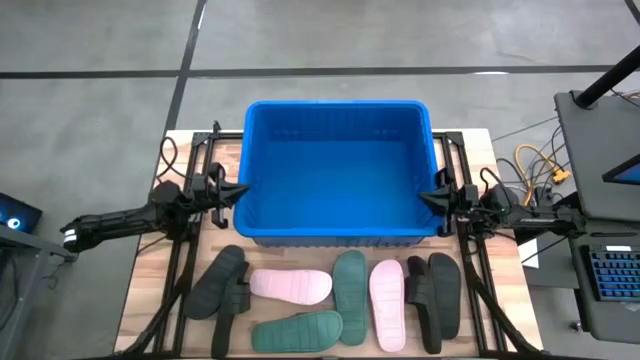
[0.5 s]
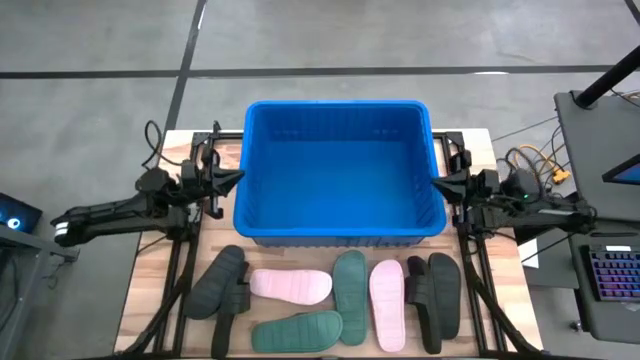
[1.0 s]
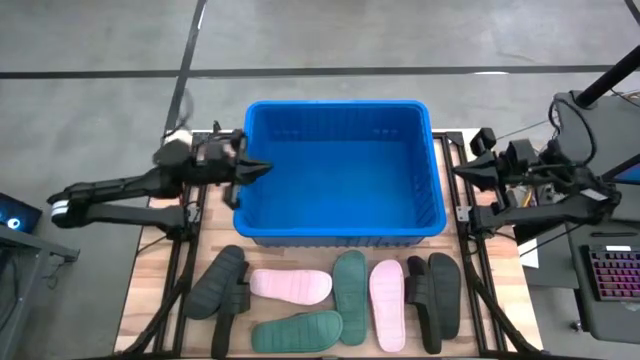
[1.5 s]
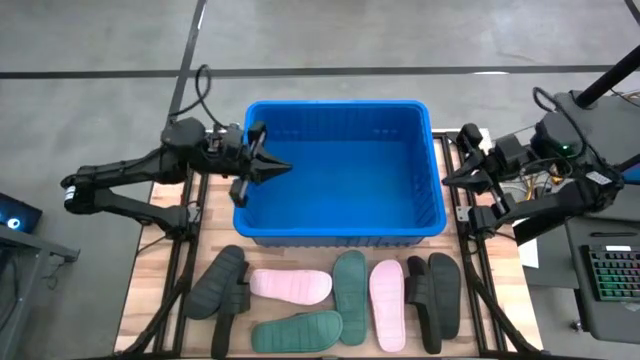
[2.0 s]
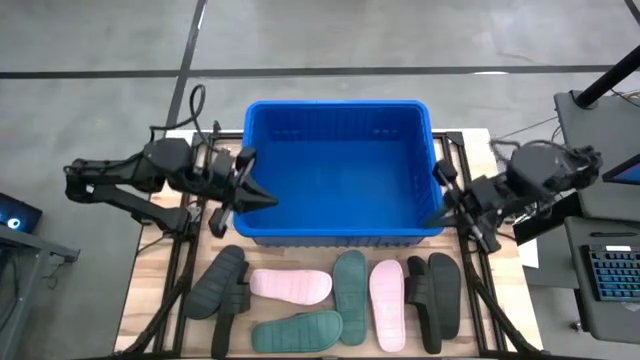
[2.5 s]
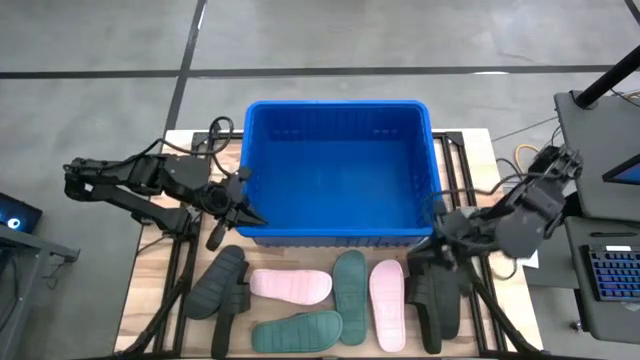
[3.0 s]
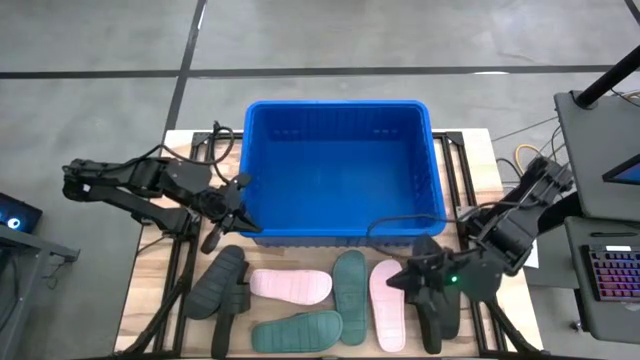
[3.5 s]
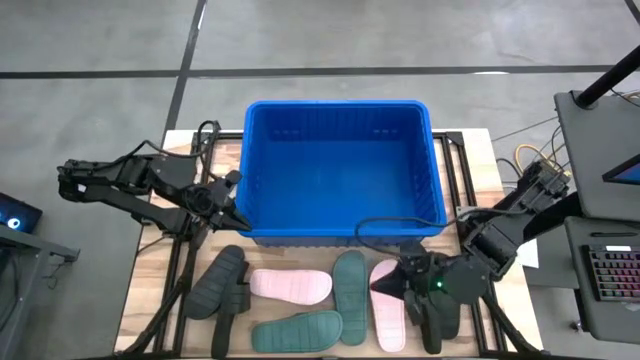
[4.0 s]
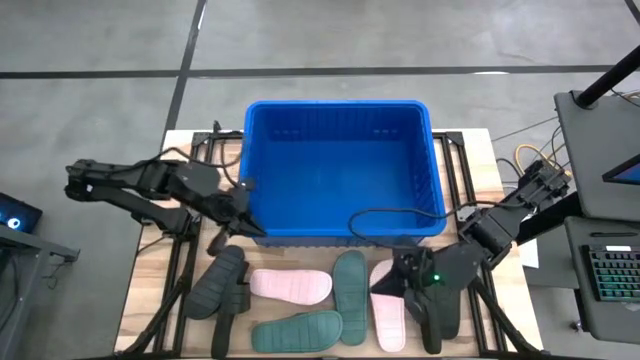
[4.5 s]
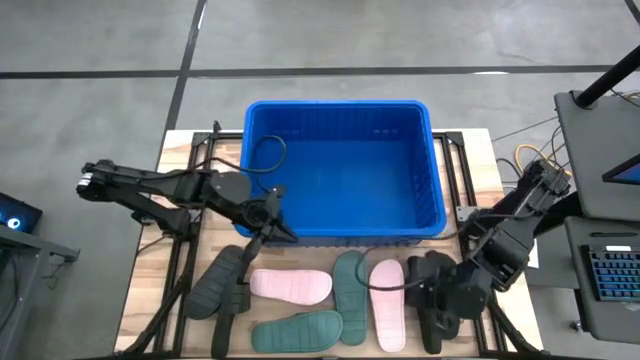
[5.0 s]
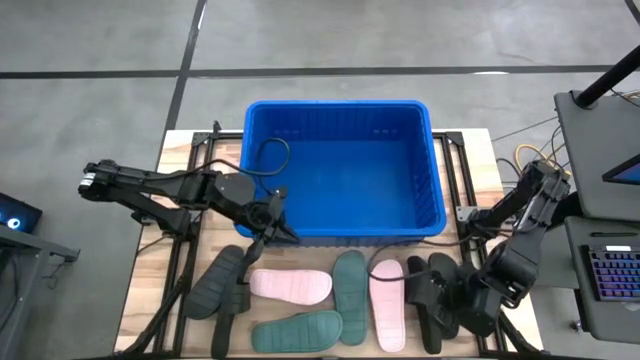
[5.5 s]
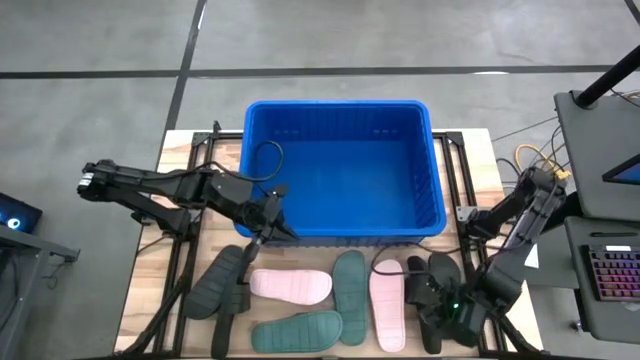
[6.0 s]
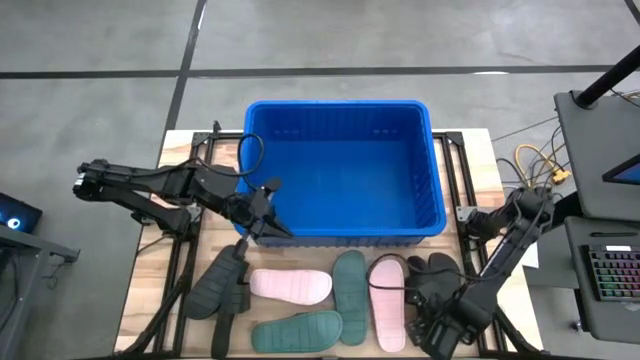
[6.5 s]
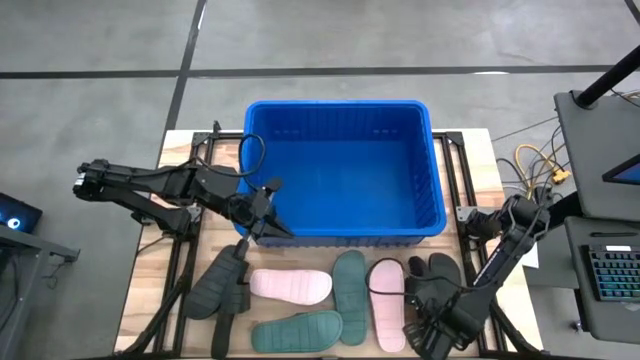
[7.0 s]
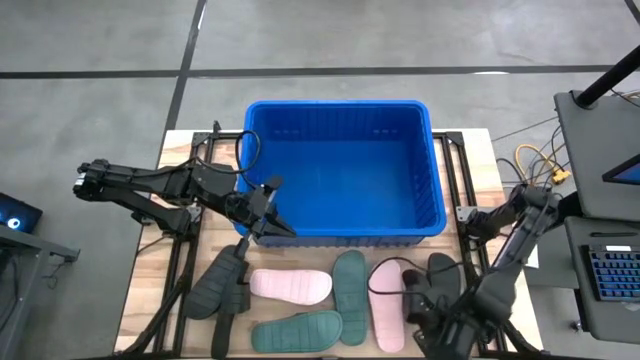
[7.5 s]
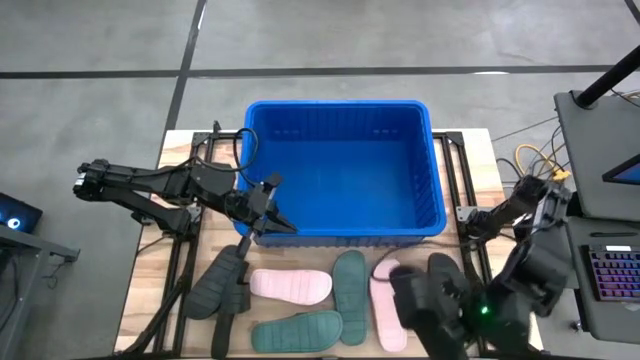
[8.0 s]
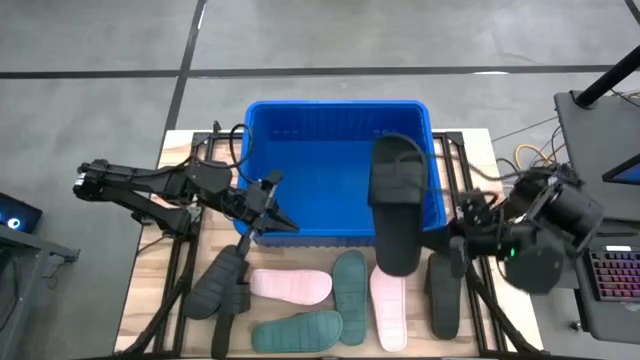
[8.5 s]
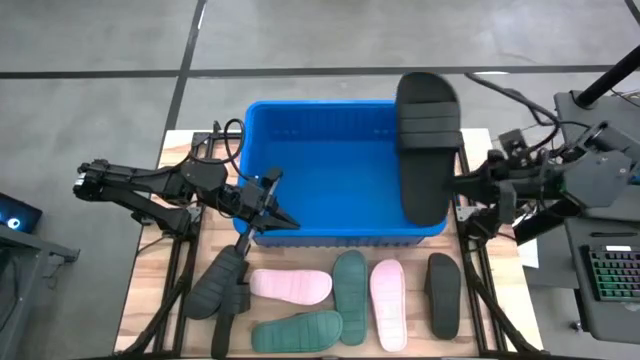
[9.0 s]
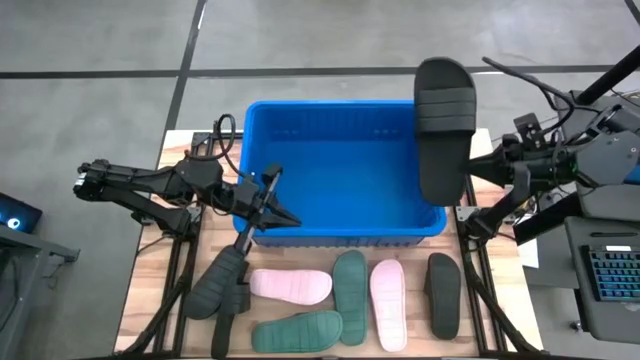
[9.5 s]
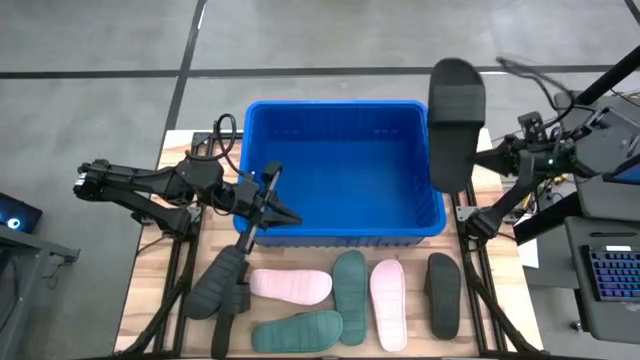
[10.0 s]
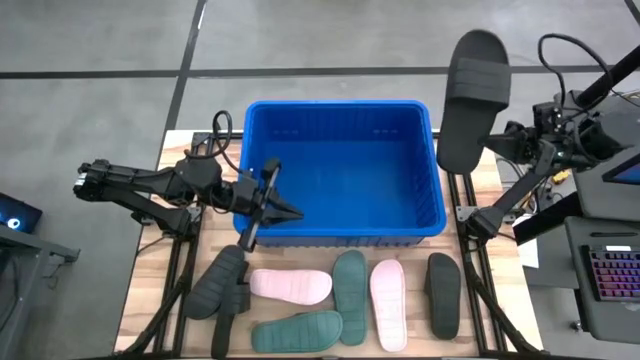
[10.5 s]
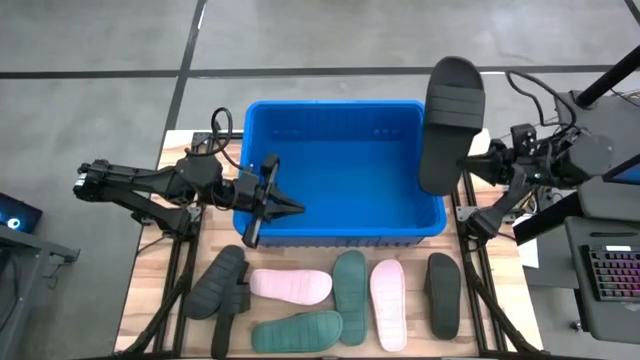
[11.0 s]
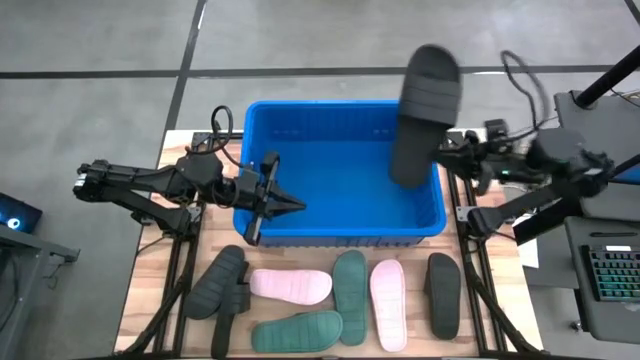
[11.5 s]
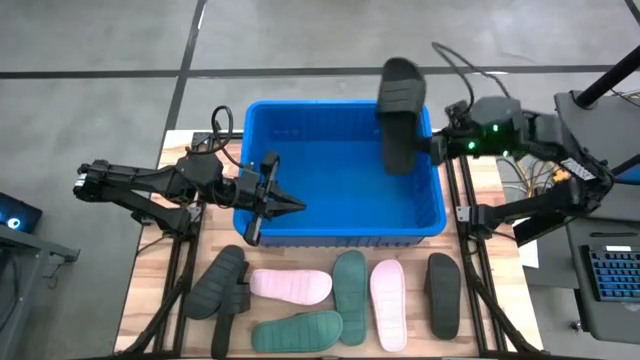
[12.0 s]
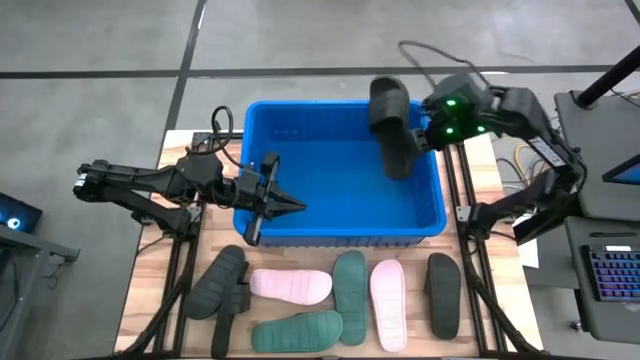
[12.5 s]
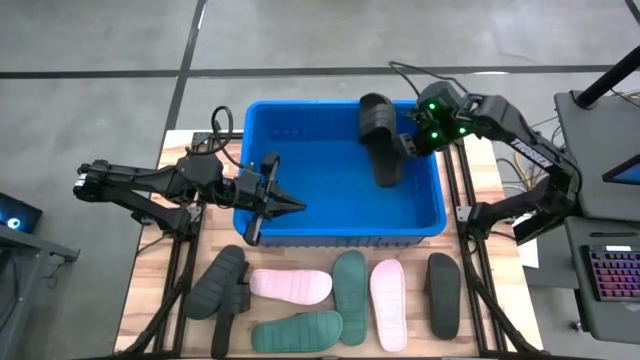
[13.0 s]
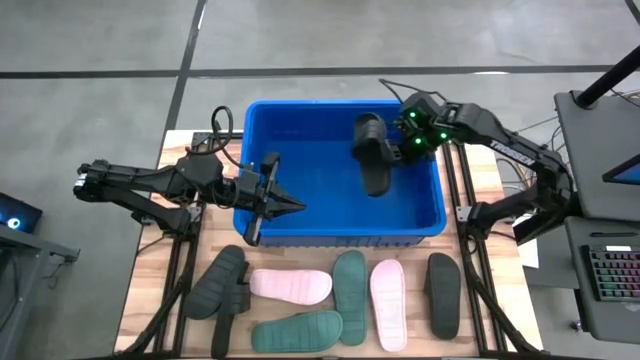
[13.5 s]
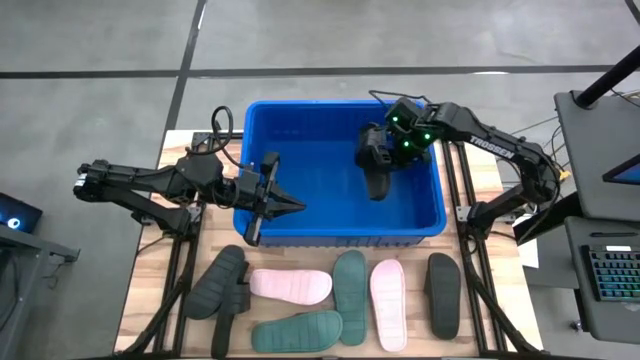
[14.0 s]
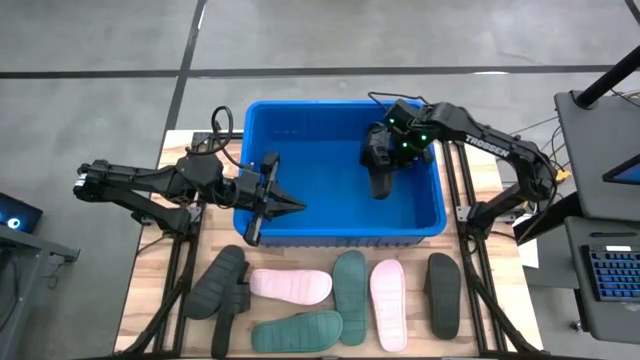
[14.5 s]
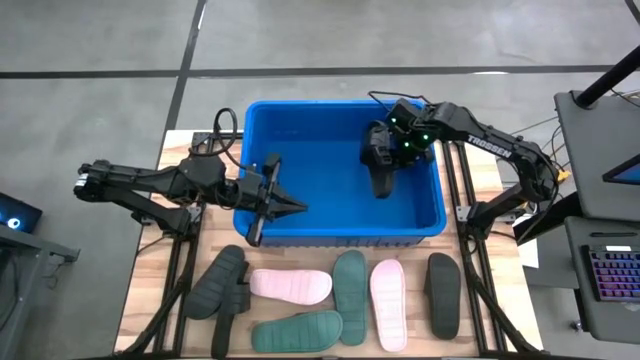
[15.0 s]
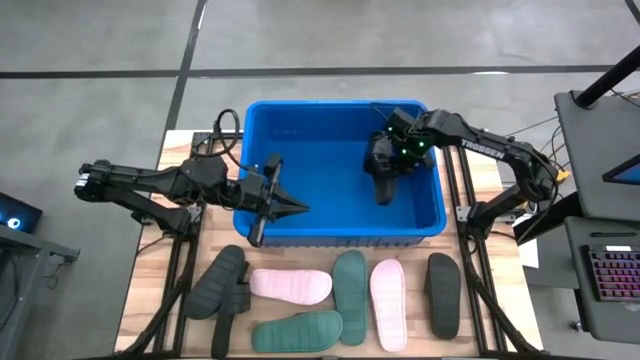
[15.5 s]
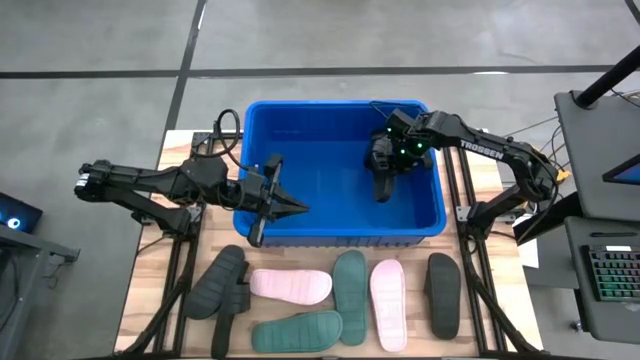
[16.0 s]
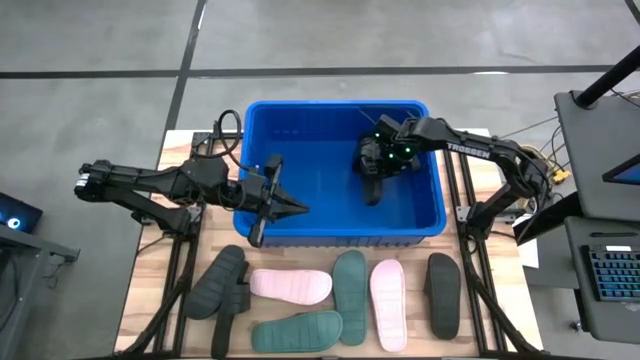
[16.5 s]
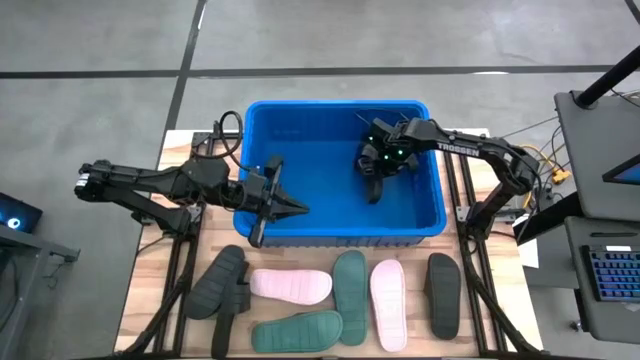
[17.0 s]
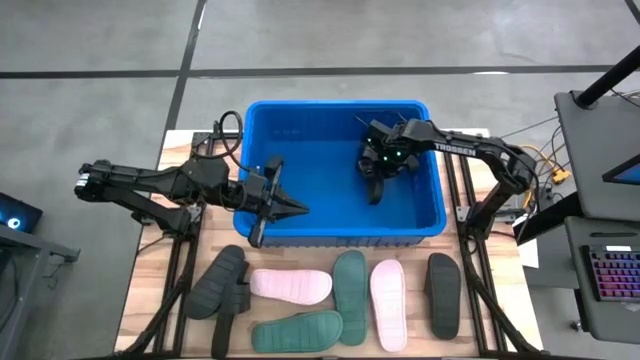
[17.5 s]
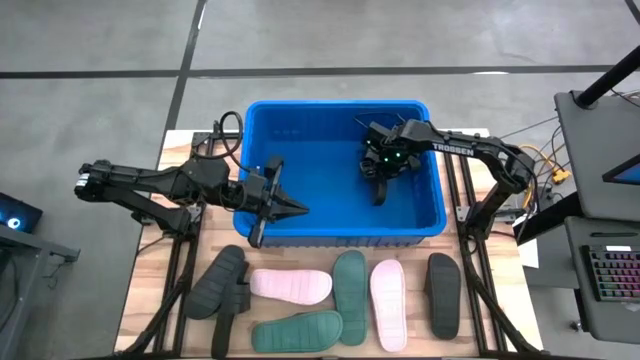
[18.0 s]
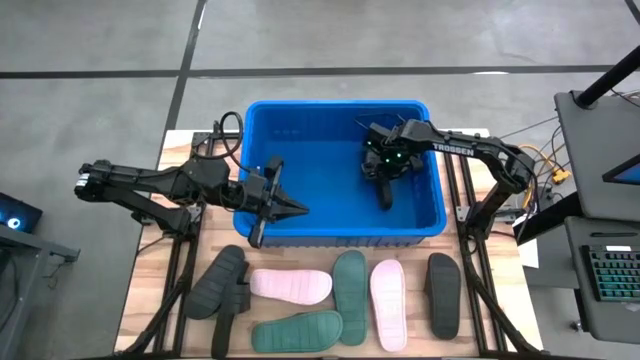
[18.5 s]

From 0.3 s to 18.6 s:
Task: Pick and place slides into bin
Put the black slide into the bin
